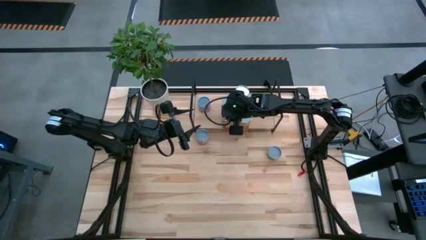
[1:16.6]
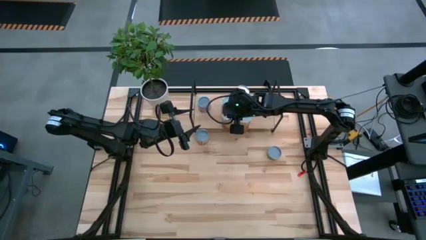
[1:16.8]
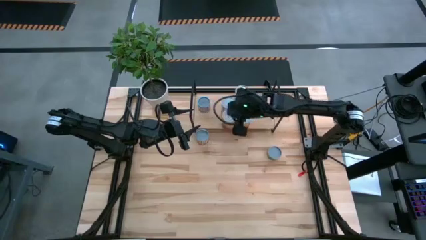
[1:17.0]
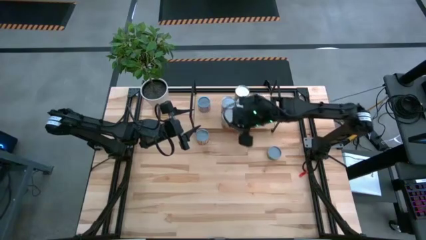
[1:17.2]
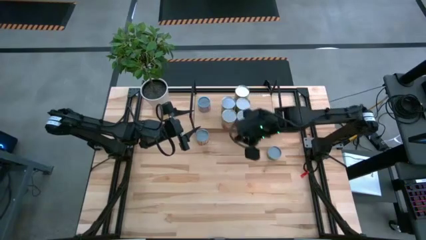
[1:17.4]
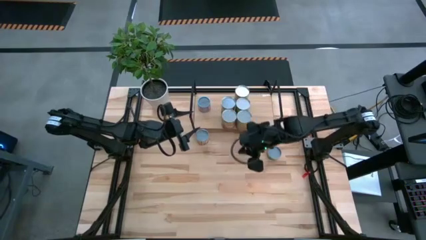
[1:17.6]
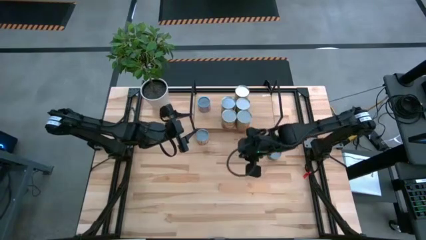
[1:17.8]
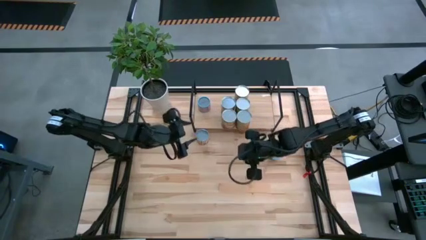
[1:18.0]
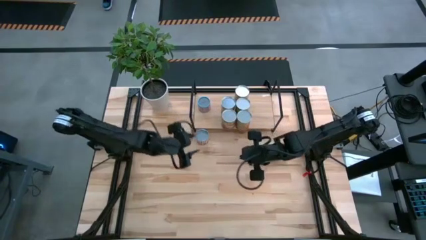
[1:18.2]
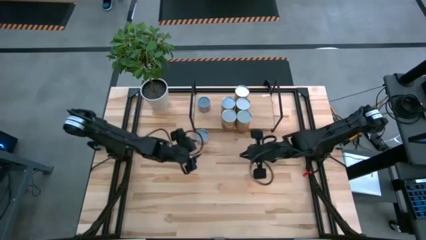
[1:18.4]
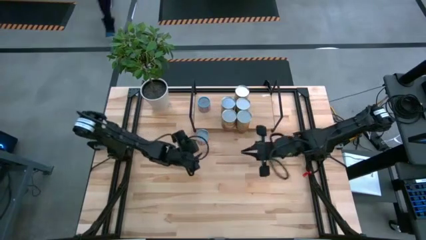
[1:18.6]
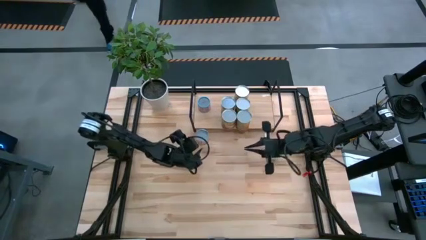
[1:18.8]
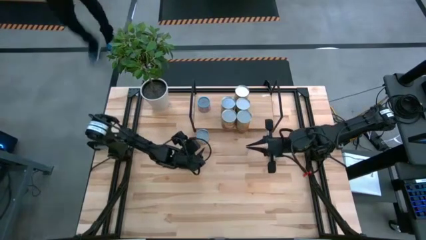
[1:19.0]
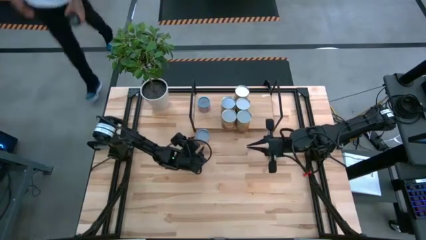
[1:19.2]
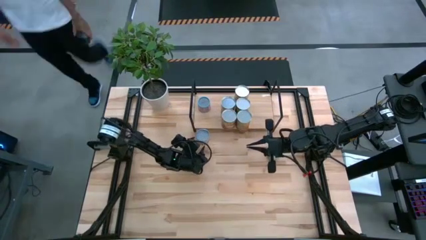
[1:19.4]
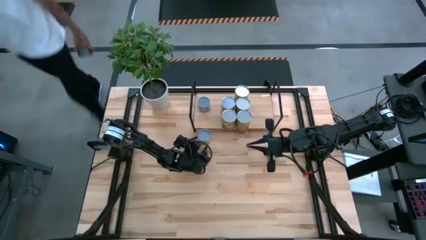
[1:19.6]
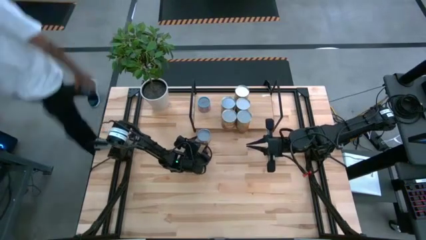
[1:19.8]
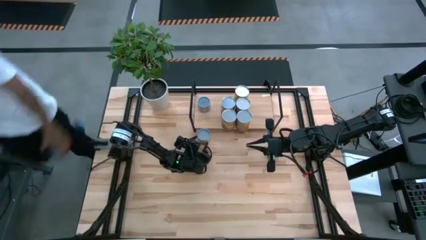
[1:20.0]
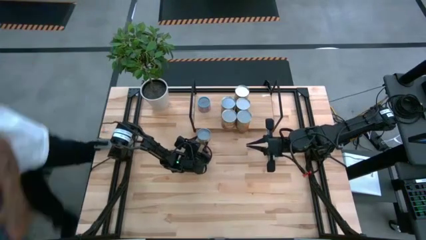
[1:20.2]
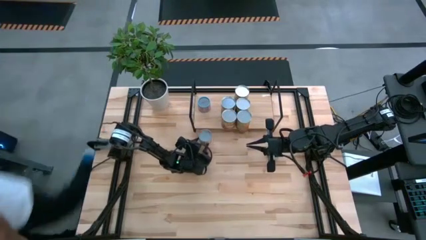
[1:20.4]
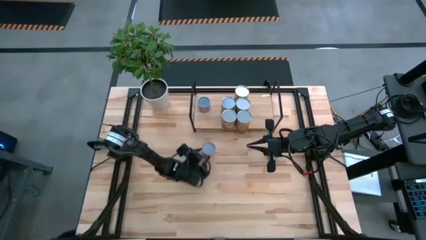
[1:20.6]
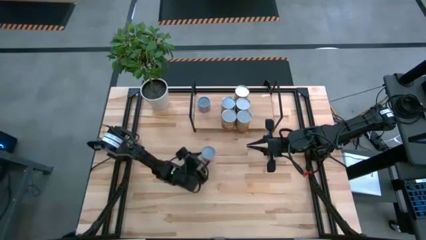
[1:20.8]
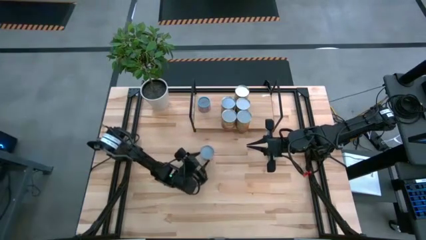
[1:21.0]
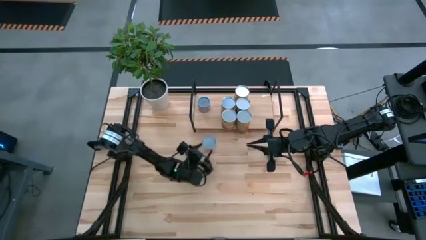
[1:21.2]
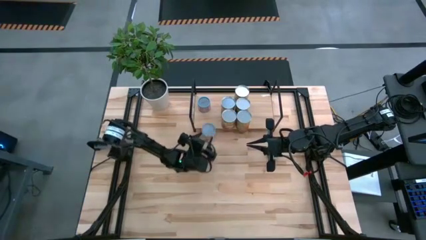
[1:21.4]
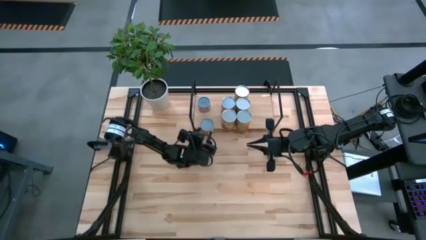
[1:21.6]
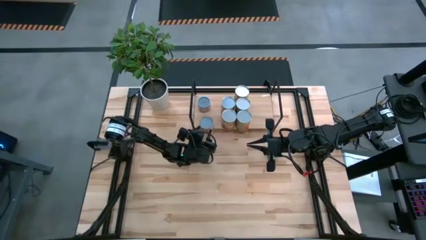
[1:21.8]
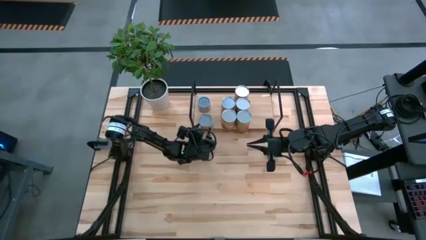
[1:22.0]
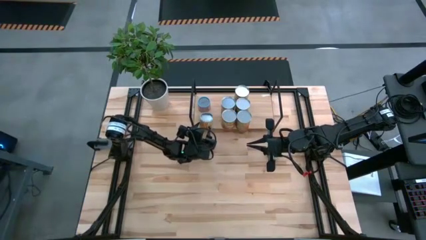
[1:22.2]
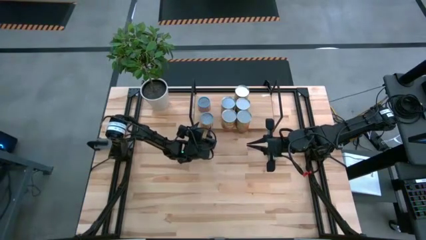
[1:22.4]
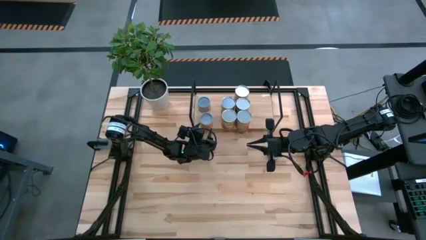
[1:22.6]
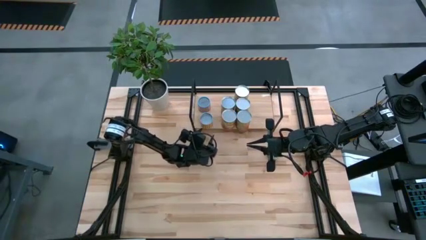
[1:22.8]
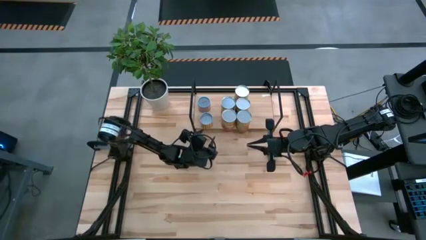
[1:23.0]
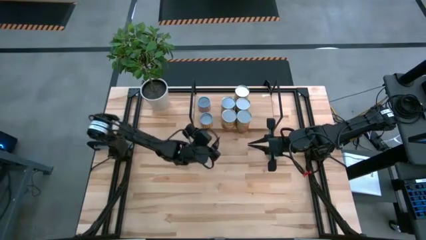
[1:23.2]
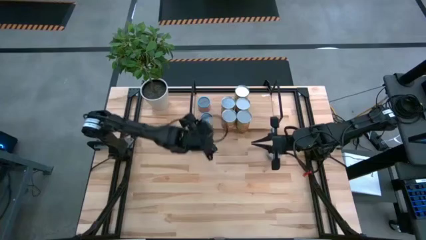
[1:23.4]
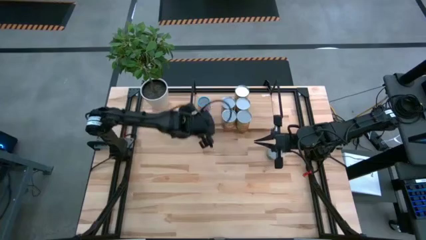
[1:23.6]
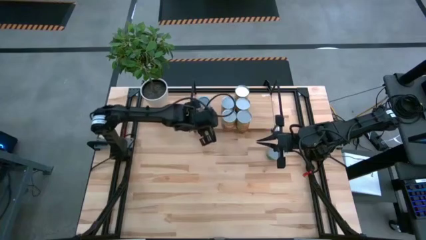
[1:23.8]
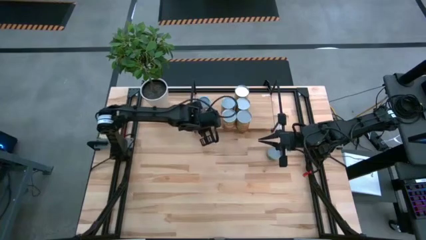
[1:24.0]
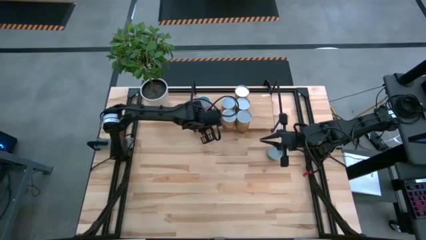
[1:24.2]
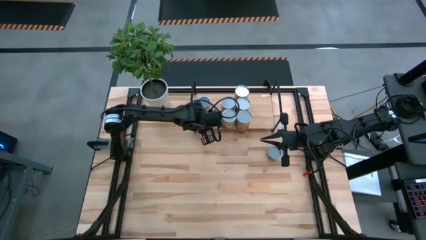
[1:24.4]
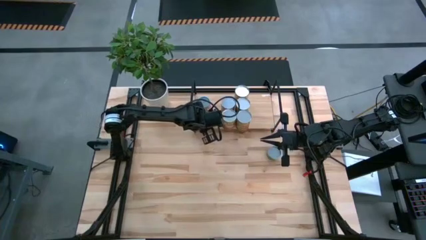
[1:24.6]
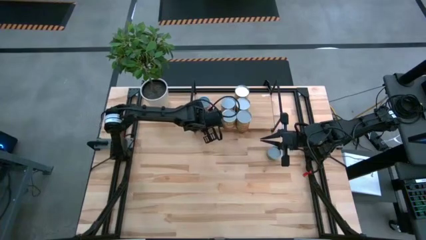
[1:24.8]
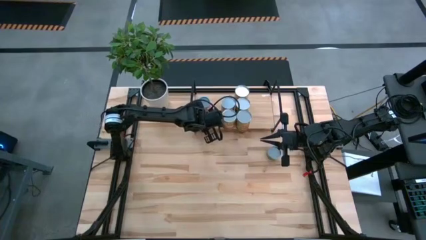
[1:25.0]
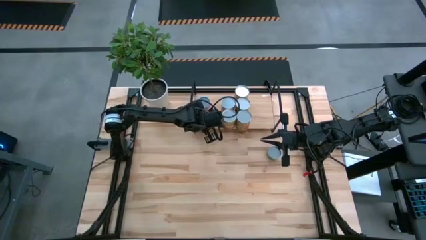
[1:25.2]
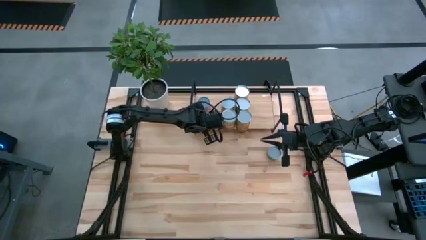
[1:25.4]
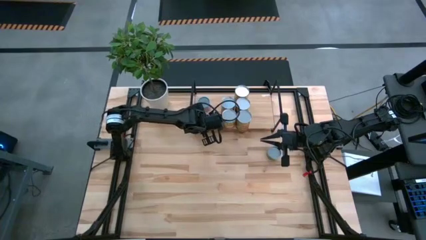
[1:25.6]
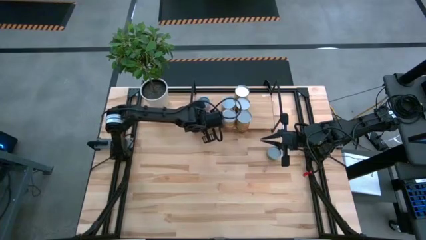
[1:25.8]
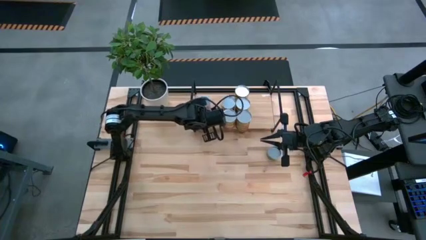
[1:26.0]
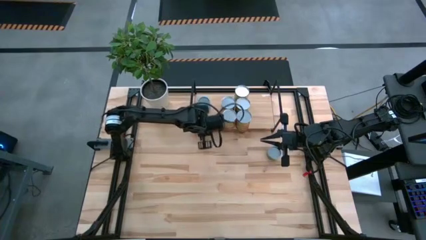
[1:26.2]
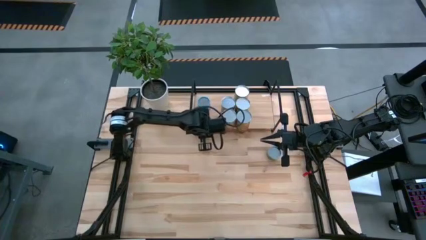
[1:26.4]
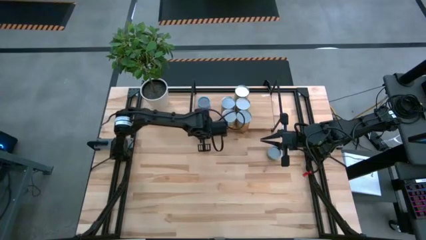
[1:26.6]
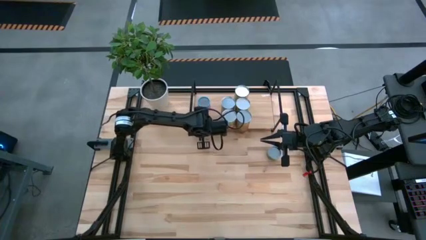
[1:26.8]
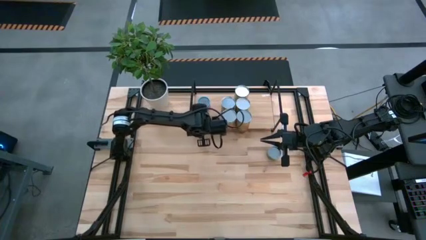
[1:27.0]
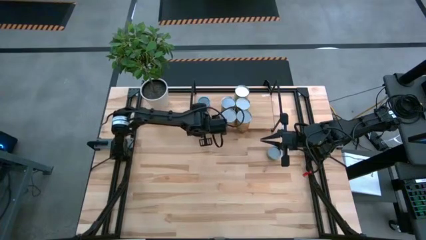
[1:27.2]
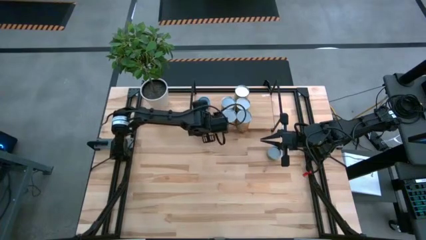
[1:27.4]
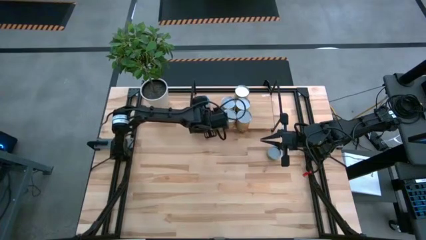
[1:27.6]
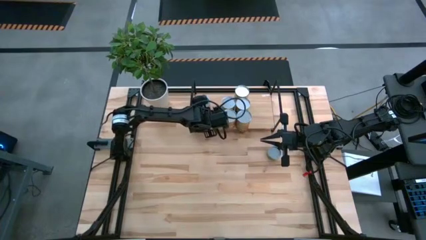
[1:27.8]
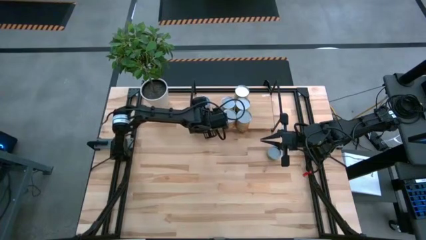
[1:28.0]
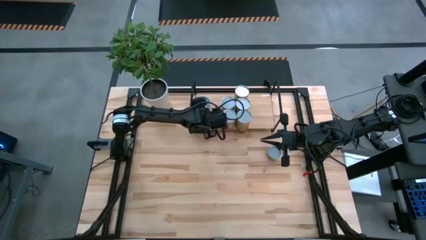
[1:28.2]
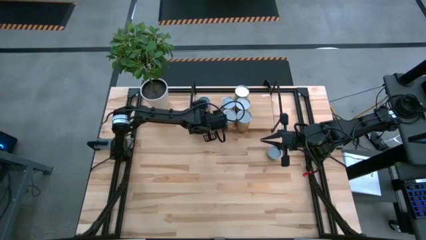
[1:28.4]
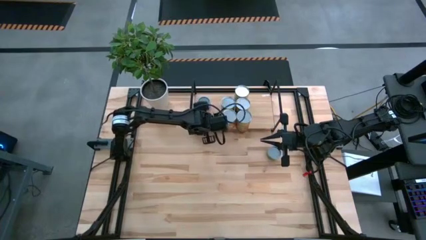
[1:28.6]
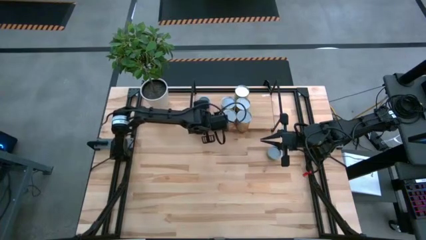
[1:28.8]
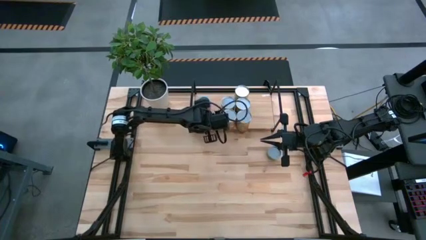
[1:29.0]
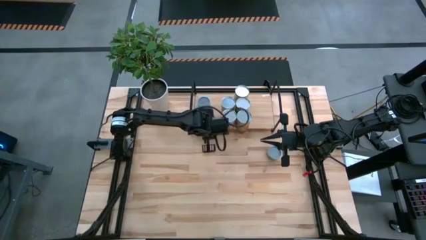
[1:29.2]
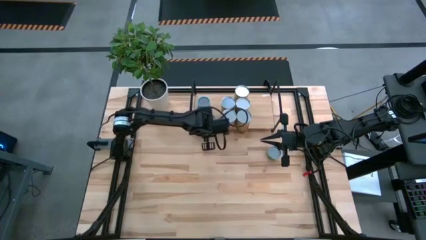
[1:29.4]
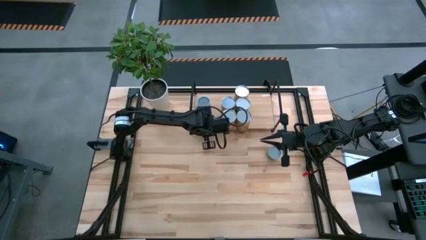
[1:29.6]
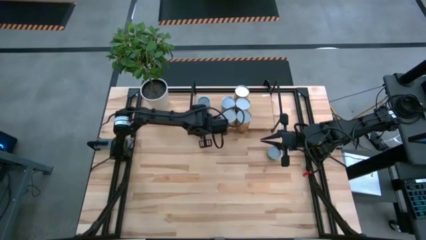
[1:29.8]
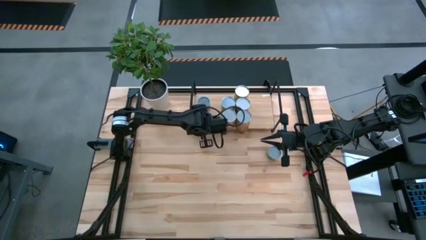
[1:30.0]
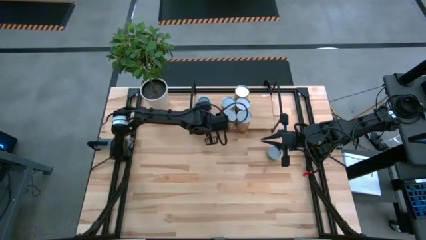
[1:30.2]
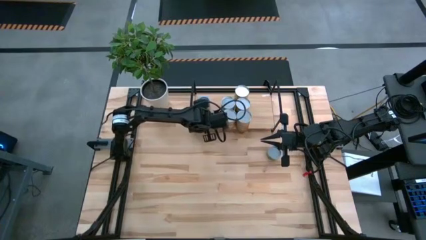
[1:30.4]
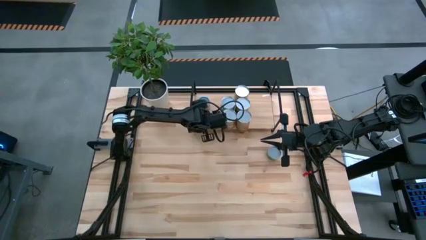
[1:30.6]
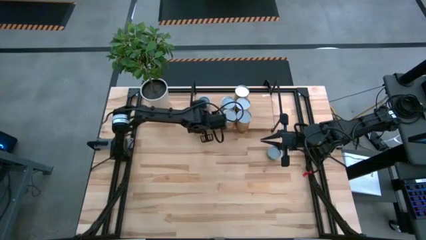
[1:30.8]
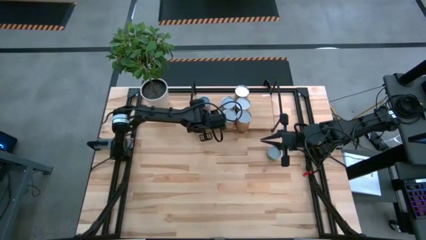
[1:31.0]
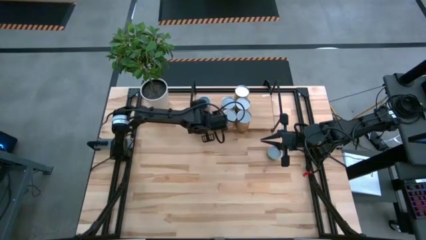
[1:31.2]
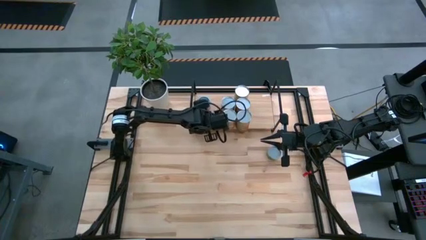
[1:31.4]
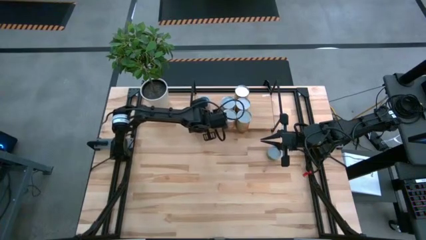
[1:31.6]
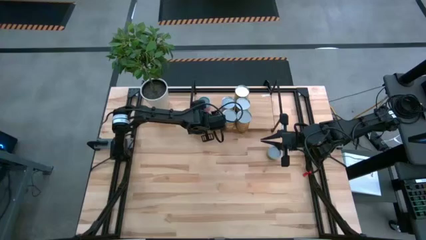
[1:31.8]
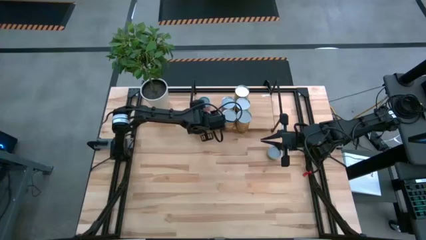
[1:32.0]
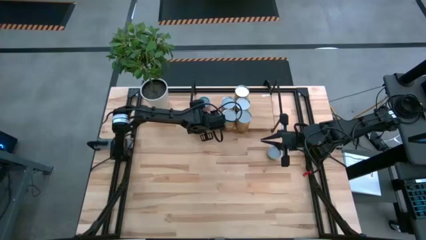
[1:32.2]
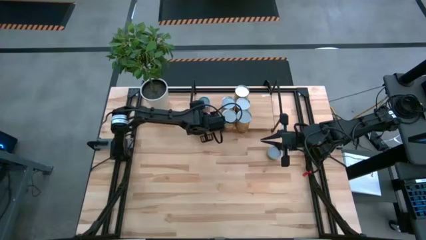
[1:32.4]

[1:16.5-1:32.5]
Task: Pick and place cans onto a shelf
Put the canned black beans on the shelf
